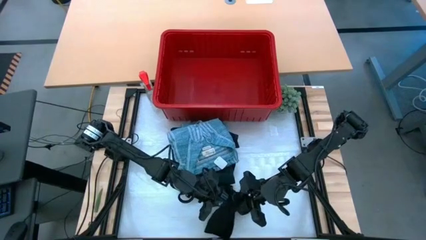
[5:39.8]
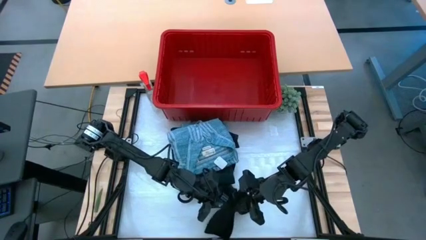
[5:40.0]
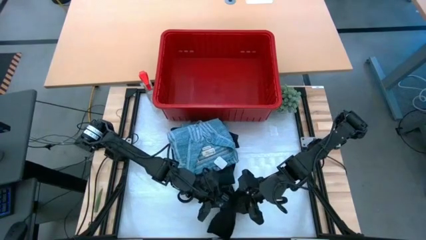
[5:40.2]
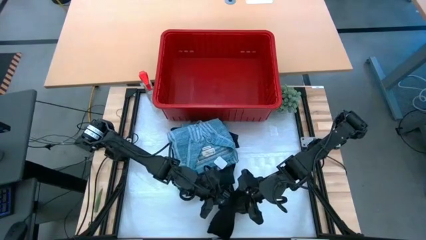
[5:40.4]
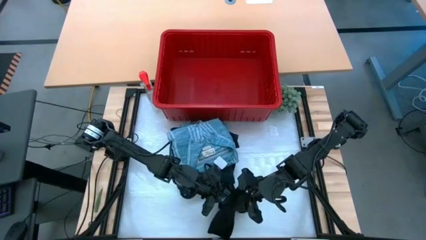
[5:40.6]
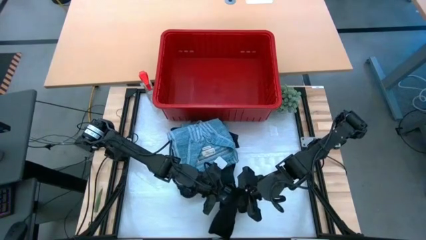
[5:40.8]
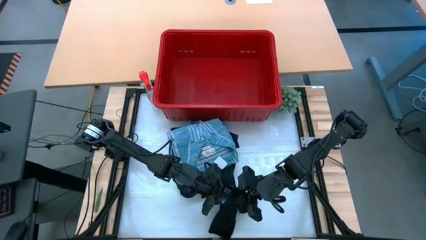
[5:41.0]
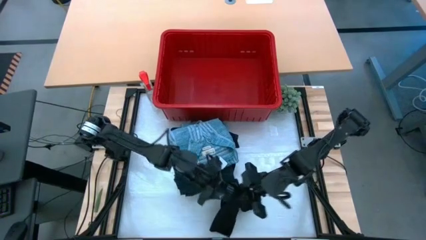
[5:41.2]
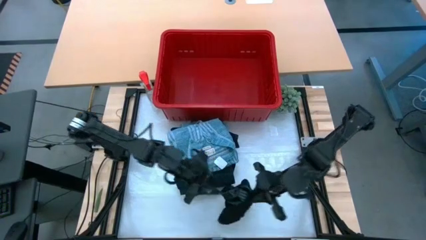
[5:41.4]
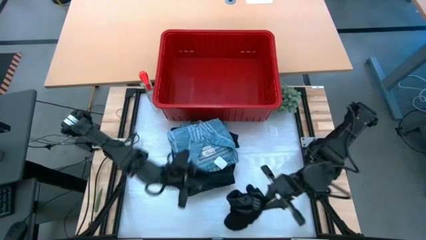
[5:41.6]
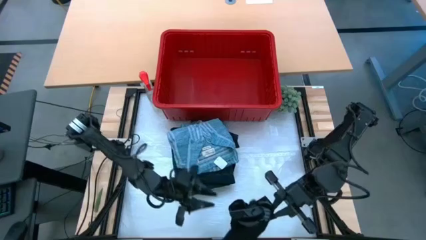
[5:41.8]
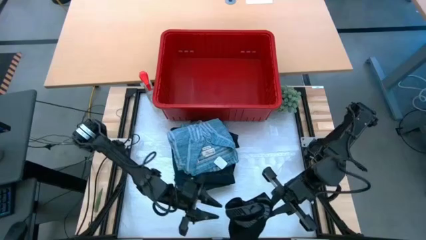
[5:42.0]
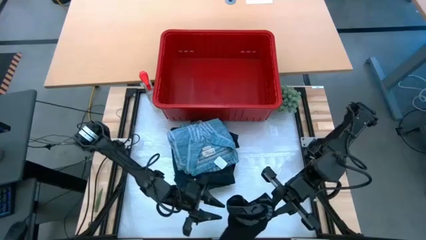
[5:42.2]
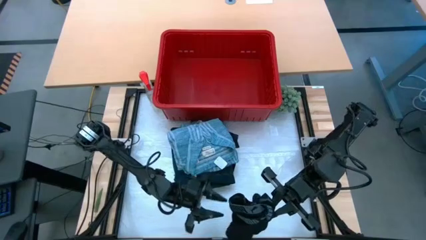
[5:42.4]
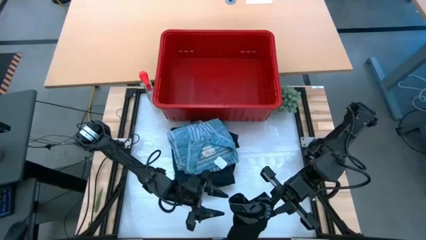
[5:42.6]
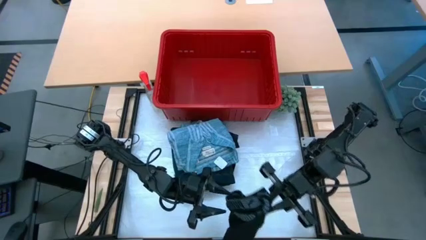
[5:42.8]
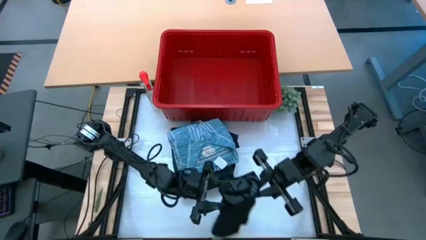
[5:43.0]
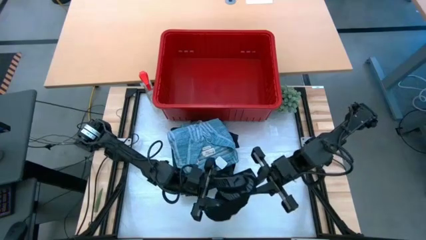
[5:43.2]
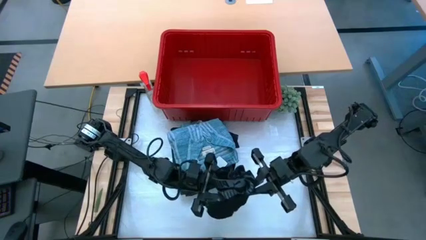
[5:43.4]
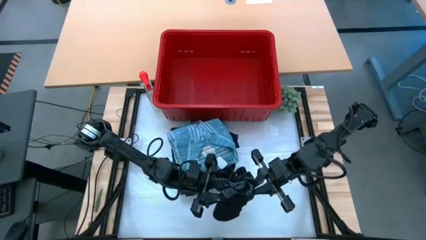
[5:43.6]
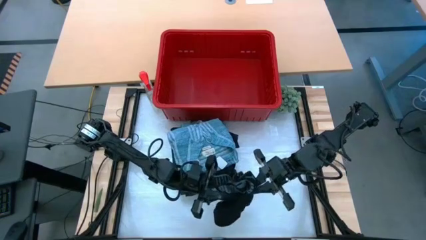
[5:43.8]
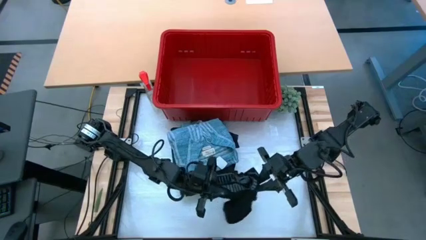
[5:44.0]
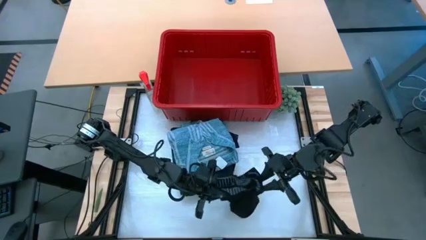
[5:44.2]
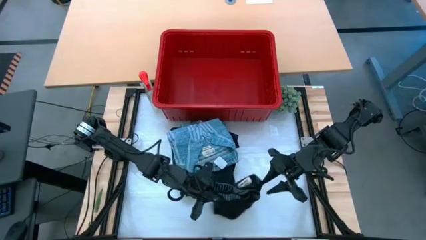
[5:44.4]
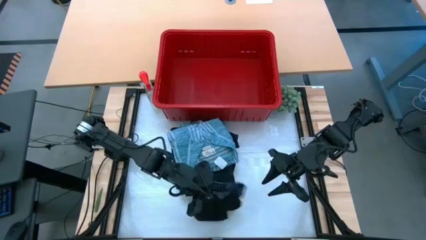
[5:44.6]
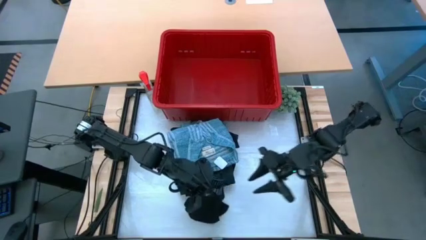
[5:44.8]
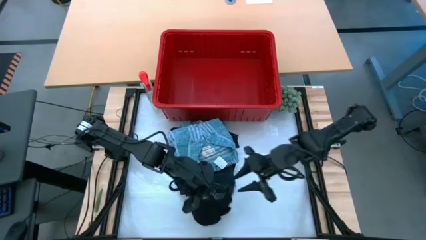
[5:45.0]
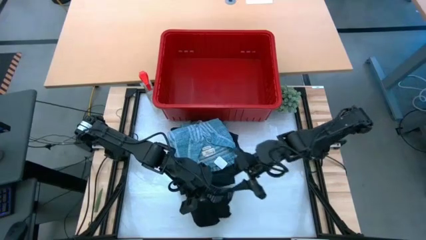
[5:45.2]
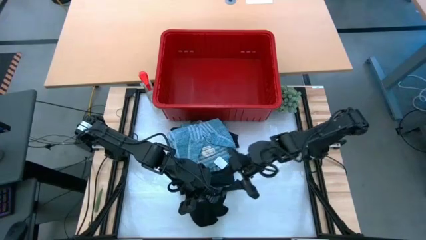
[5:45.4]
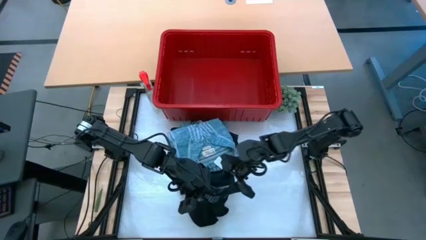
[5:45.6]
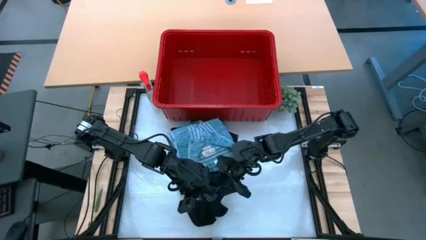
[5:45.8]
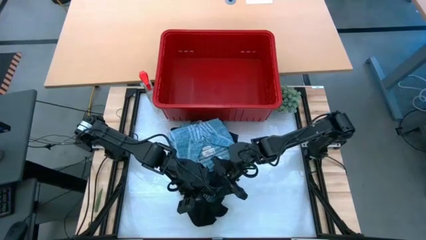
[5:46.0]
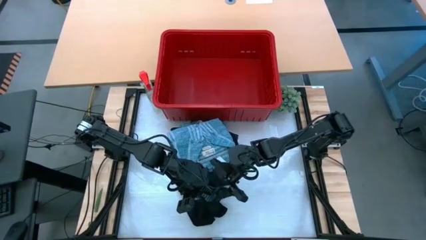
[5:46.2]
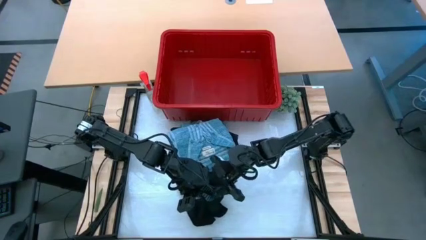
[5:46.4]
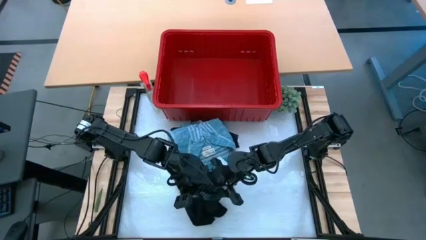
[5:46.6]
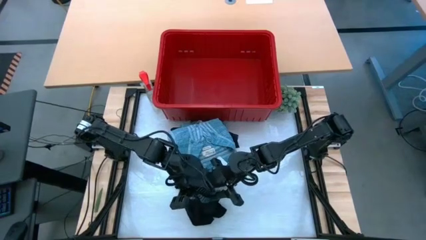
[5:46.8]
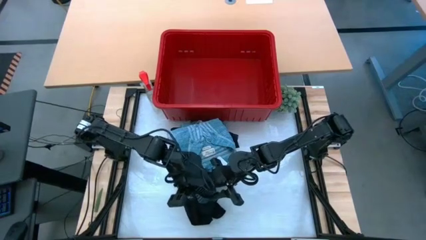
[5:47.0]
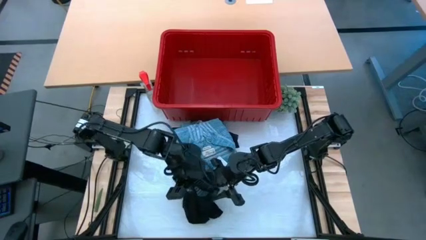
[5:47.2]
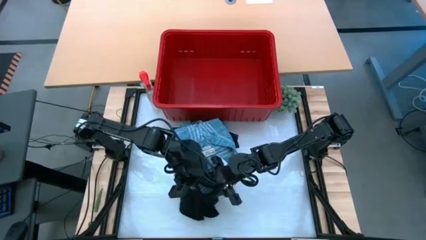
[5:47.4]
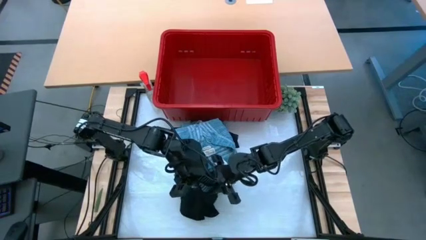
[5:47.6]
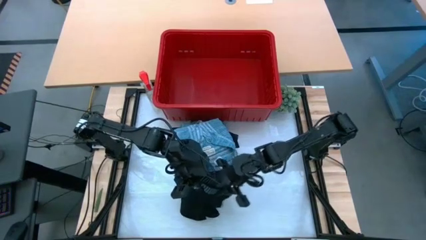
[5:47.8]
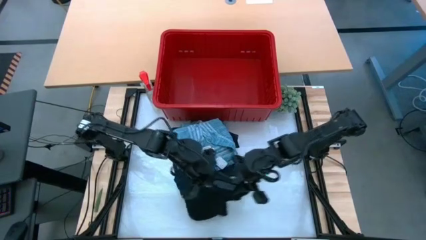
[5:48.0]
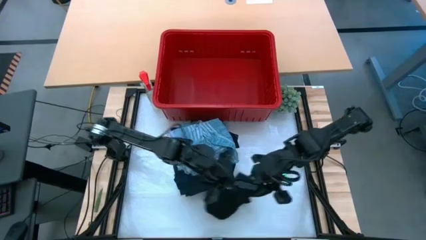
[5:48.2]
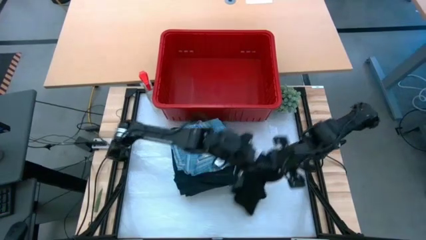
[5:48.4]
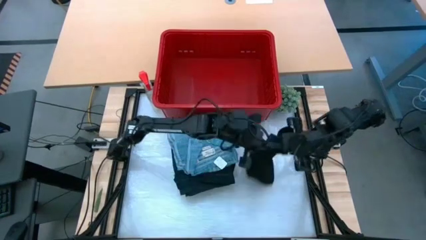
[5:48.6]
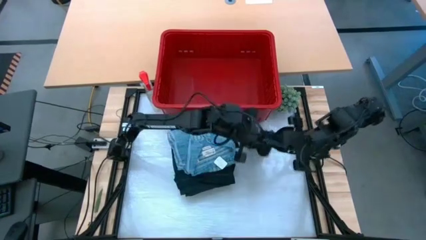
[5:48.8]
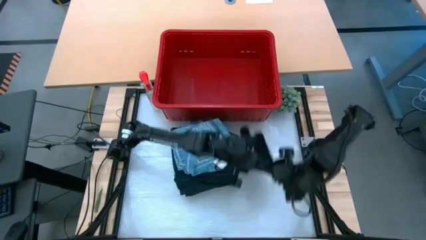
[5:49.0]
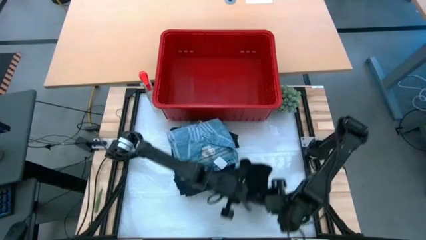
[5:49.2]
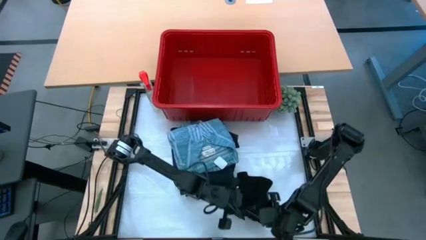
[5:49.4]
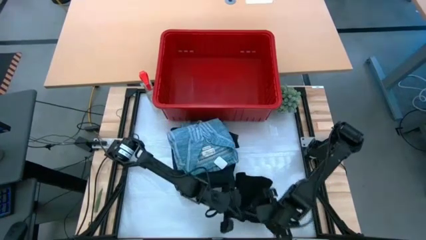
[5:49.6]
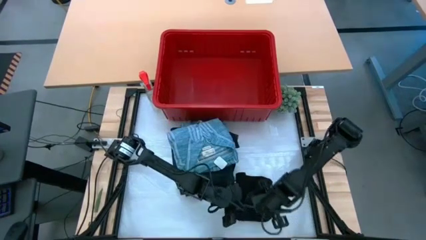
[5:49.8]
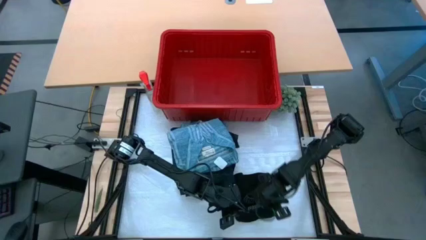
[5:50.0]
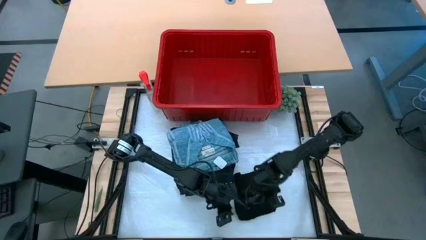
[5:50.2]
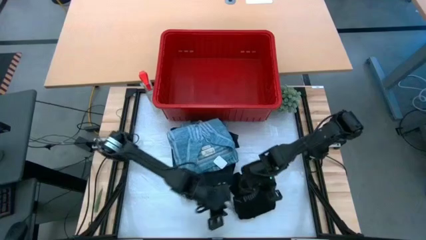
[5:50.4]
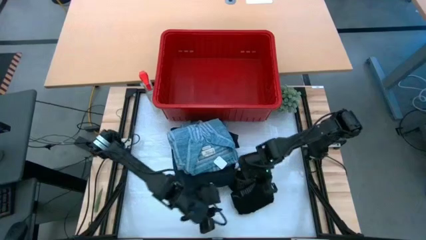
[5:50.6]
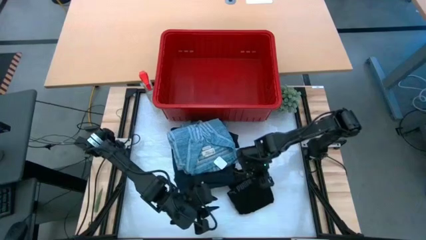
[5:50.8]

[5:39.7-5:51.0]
Task: Fold Laundry from Bin
Fold the black underwear

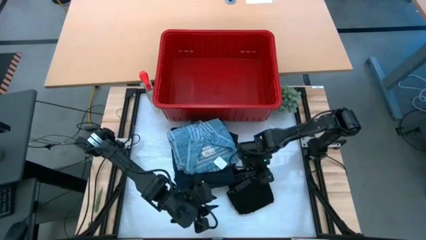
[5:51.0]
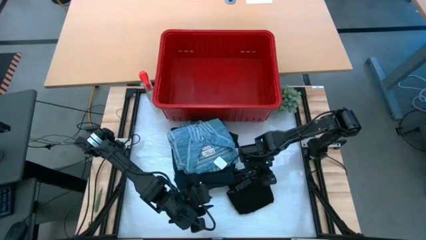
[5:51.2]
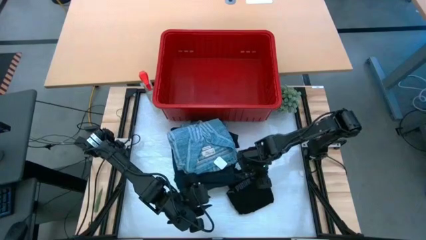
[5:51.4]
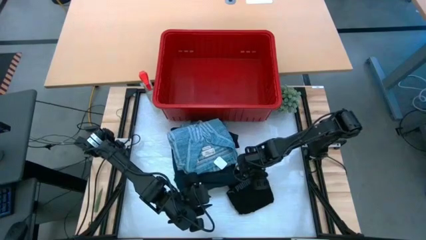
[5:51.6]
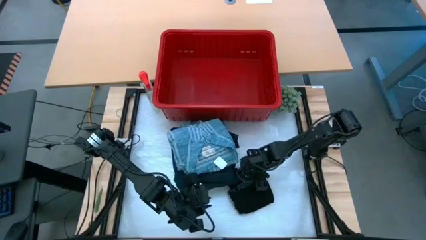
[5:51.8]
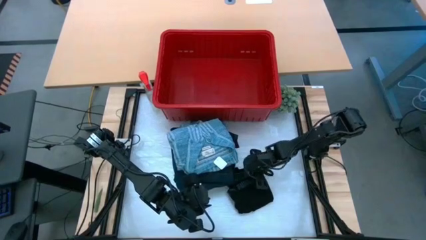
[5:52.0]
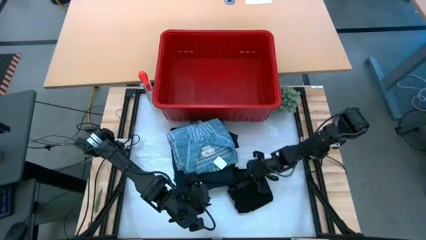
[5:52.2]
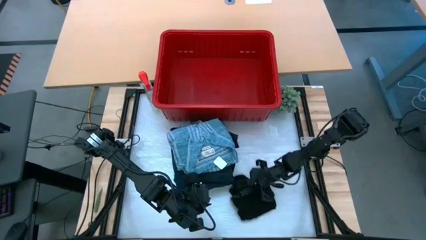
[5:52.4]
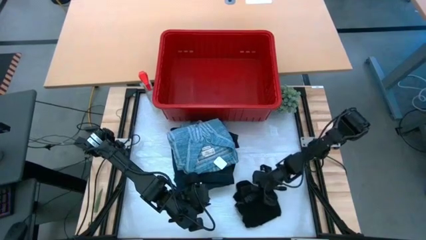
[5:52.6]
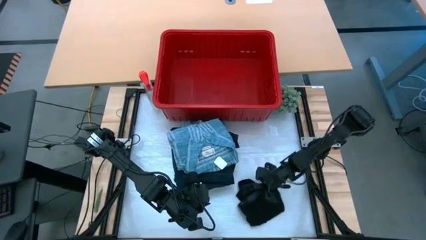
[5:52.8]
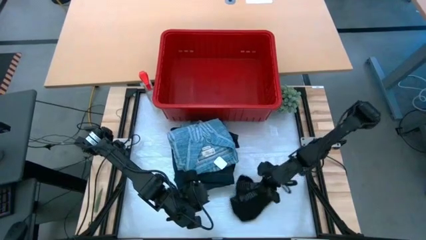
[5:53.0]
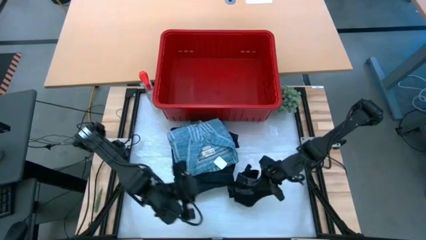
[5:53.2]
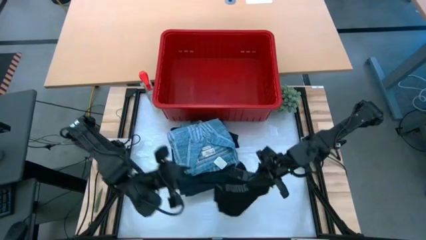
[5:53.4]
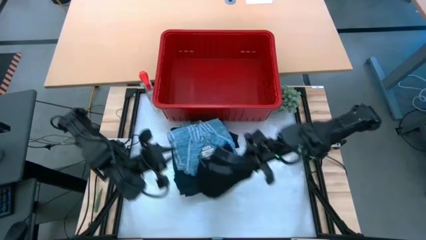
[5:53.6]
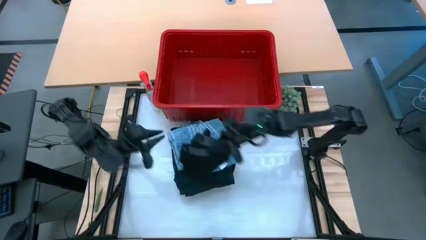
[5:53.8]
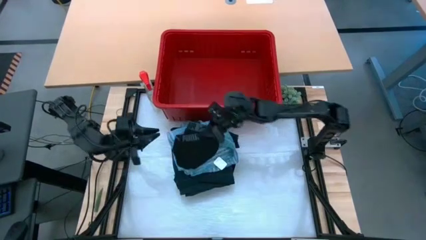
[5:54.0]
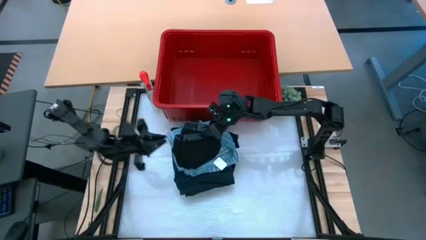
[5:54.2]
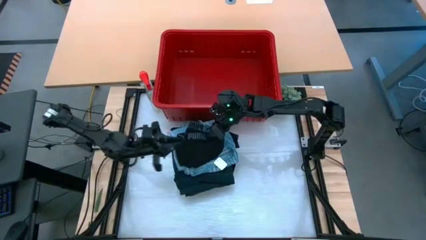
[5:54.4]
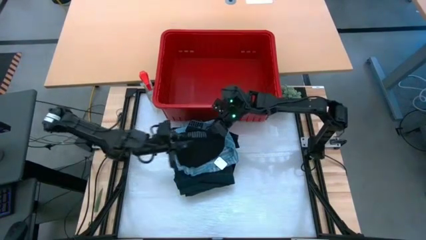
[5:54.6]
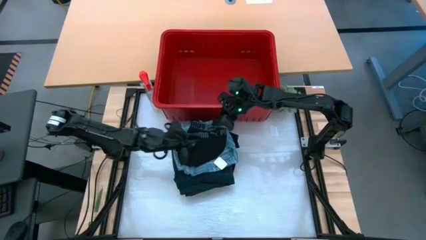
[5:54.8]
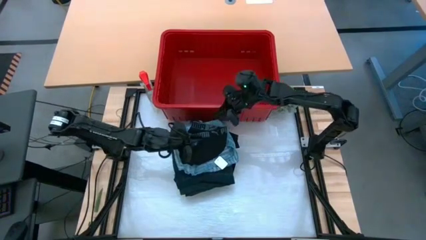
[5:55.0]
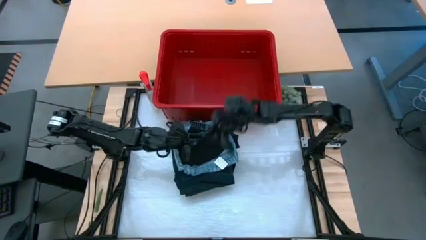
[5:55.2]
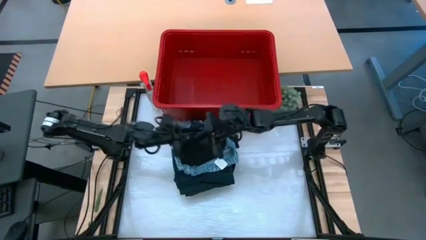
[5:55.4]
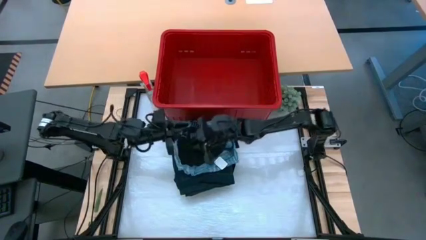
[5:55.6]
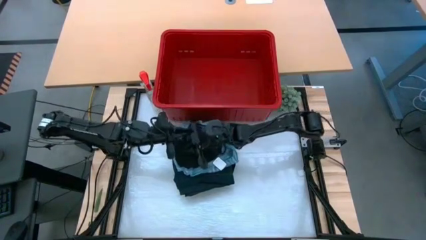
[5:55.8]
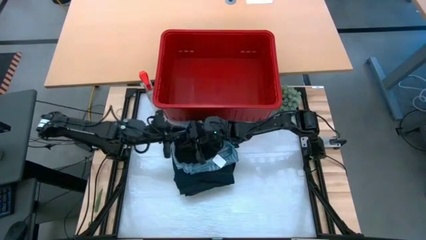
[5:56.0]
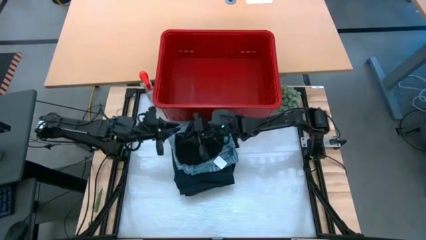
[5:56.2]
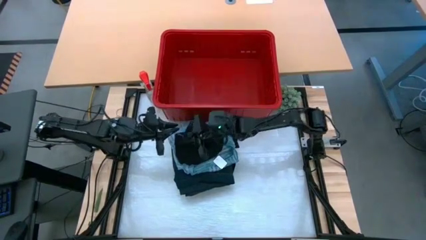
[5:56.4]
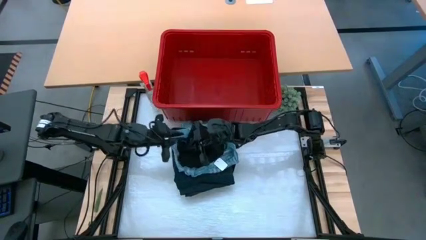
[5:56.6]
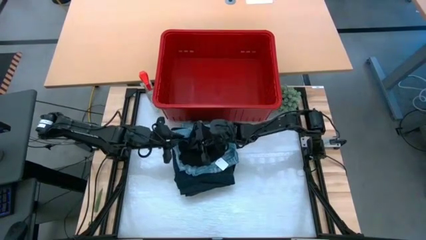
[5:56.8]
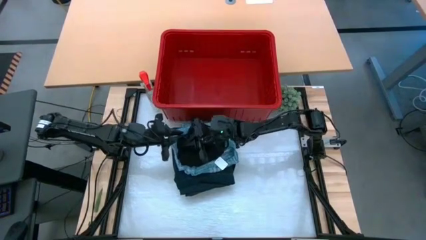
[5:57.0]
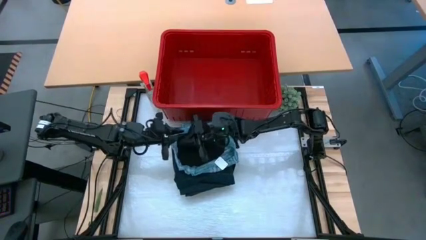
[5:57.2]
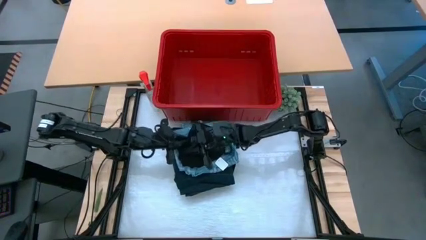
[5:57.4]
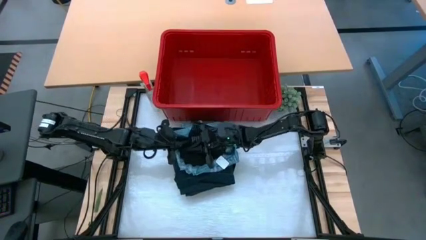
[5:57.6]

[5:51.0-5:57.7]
Stack the black underwear on top of the blue and white patterned shirt
